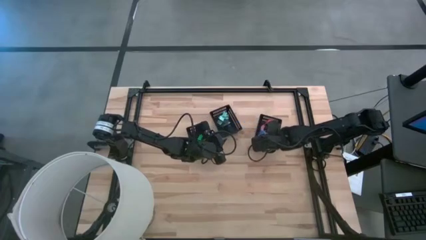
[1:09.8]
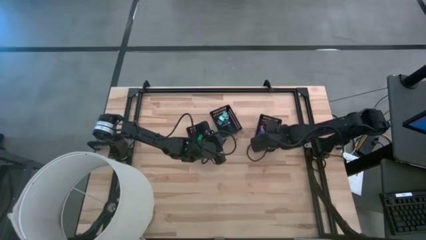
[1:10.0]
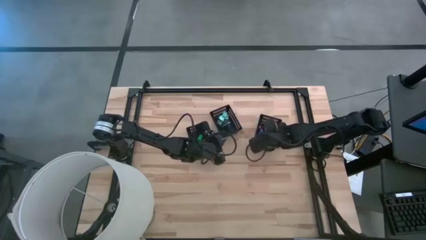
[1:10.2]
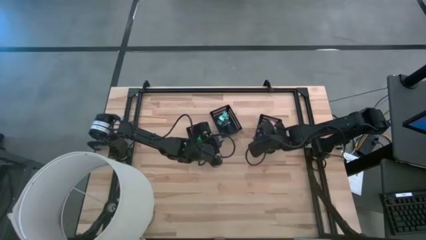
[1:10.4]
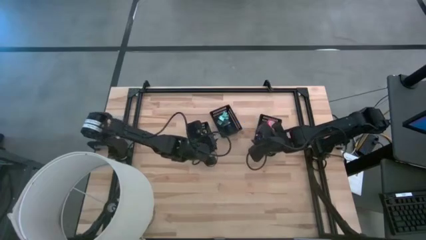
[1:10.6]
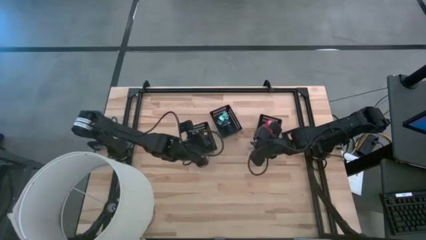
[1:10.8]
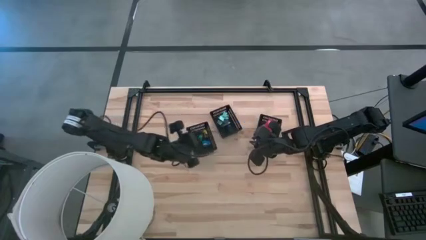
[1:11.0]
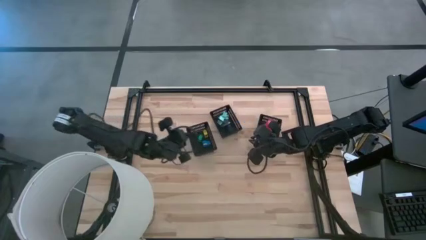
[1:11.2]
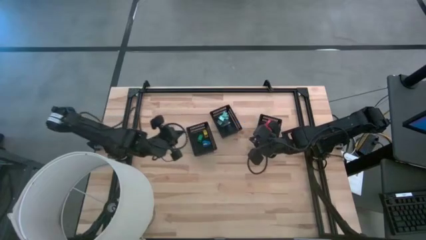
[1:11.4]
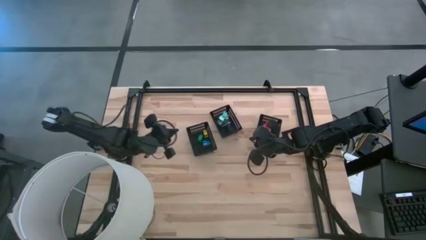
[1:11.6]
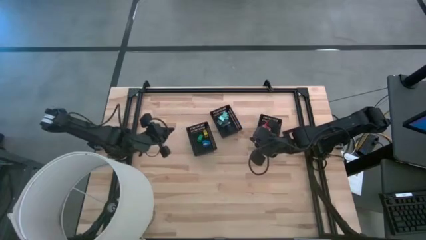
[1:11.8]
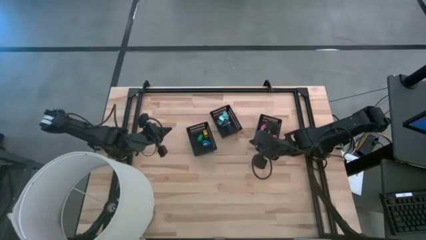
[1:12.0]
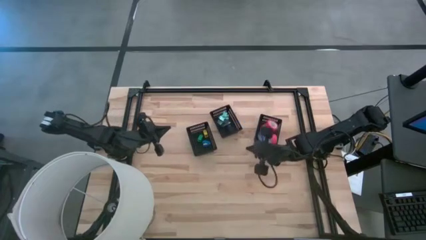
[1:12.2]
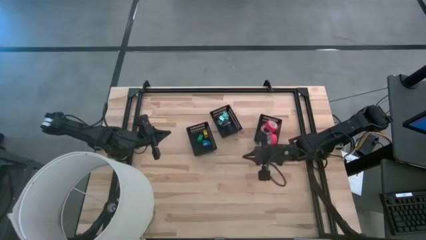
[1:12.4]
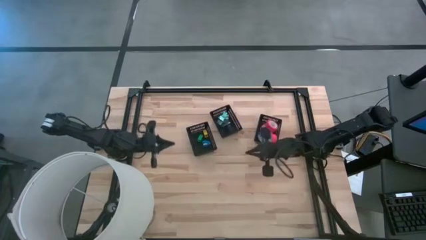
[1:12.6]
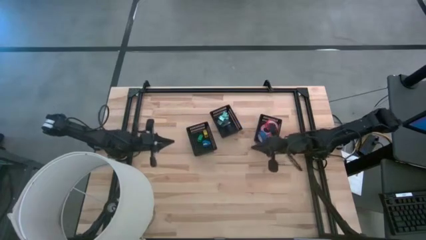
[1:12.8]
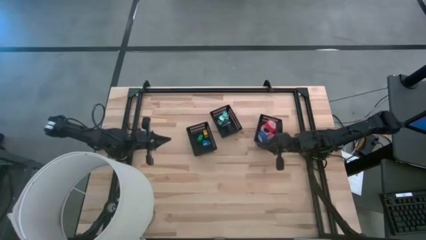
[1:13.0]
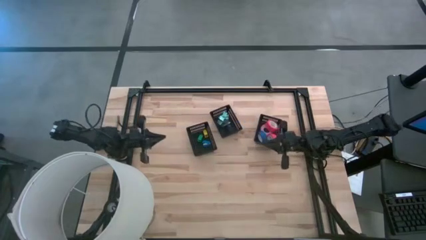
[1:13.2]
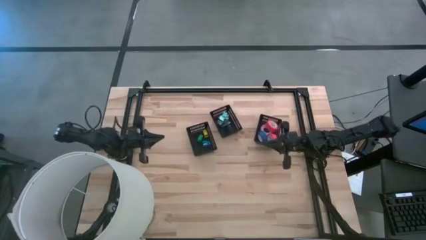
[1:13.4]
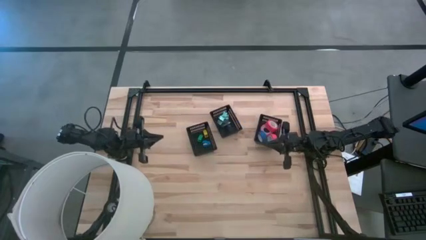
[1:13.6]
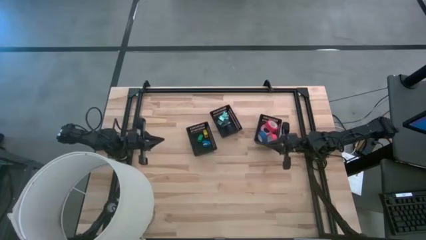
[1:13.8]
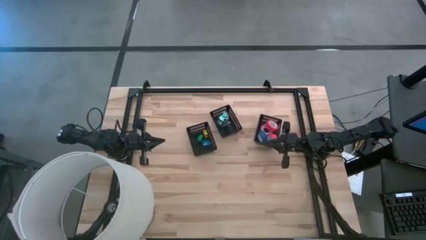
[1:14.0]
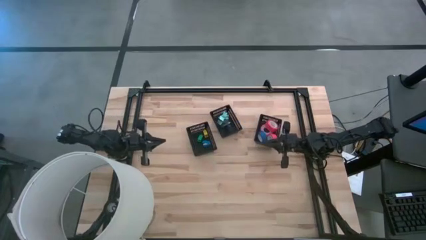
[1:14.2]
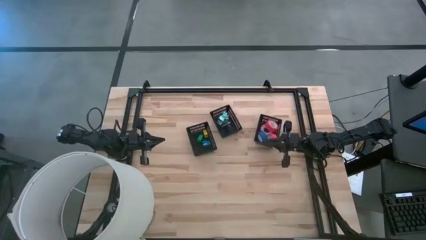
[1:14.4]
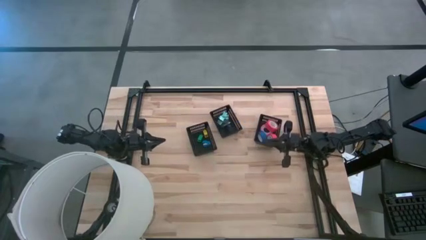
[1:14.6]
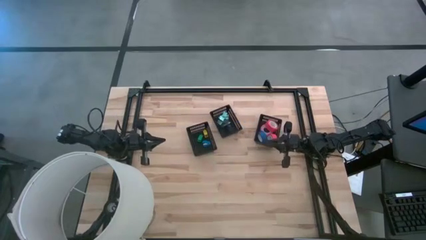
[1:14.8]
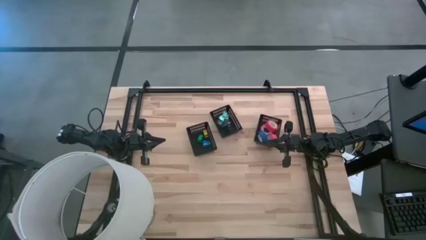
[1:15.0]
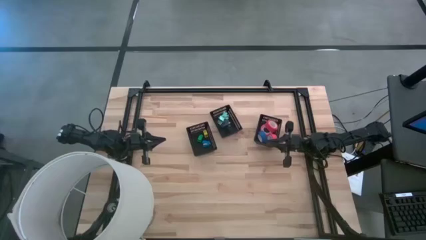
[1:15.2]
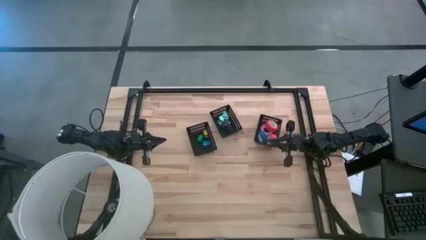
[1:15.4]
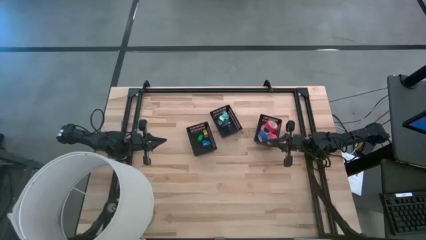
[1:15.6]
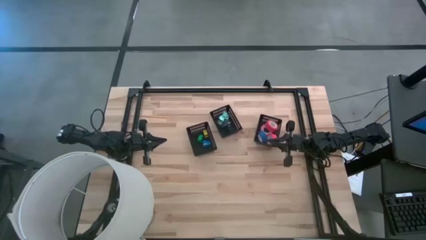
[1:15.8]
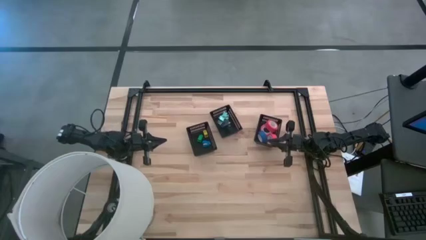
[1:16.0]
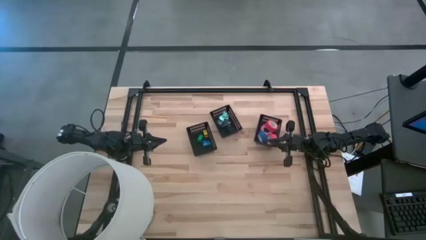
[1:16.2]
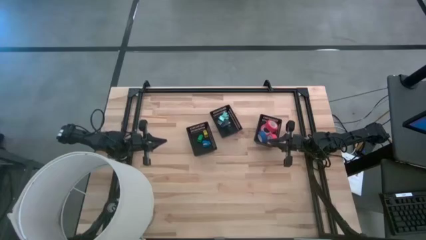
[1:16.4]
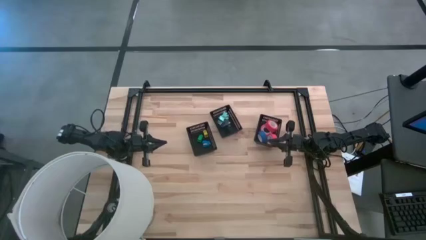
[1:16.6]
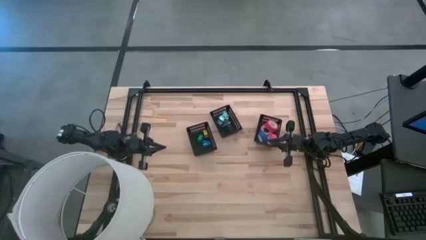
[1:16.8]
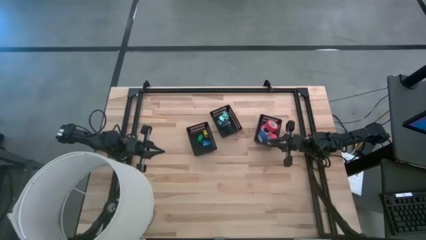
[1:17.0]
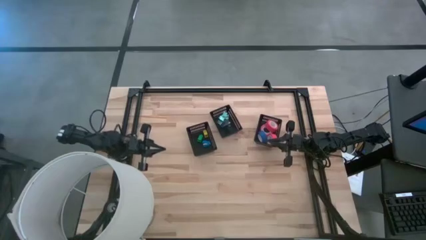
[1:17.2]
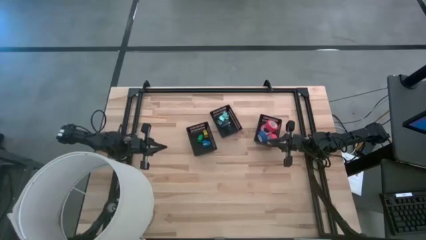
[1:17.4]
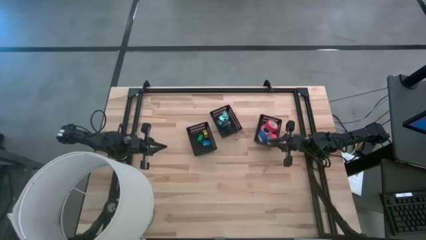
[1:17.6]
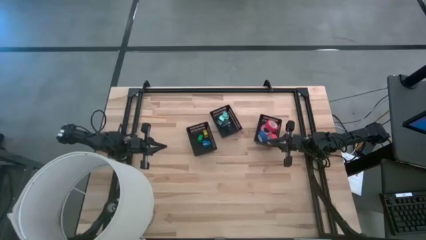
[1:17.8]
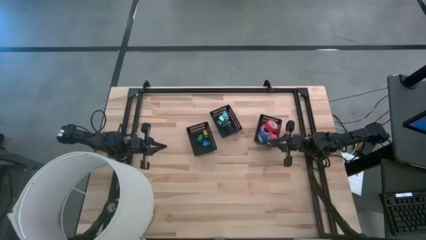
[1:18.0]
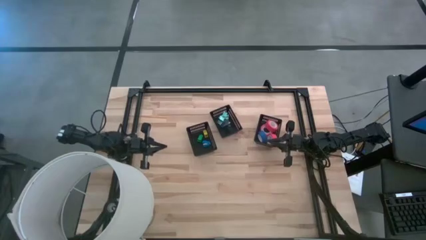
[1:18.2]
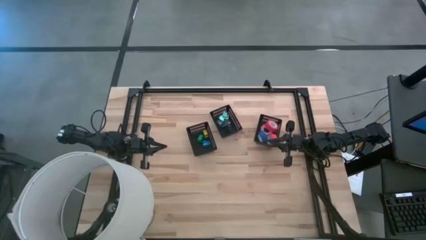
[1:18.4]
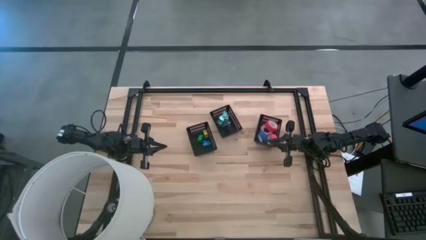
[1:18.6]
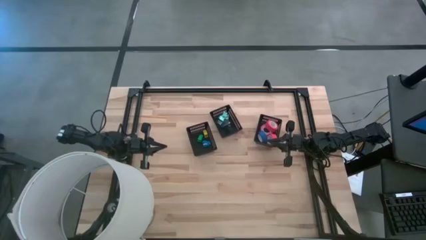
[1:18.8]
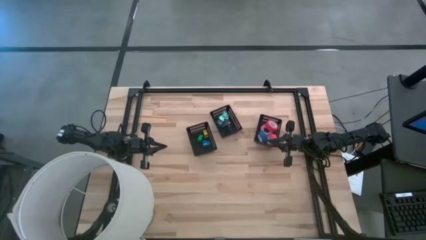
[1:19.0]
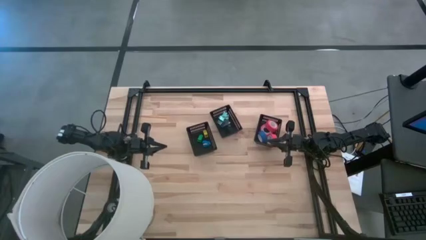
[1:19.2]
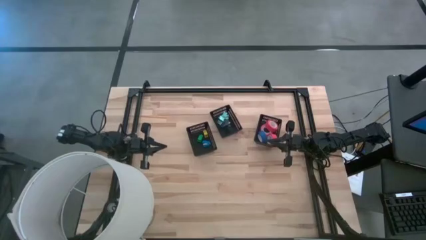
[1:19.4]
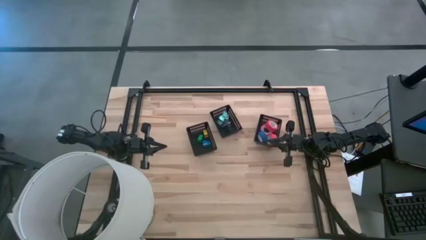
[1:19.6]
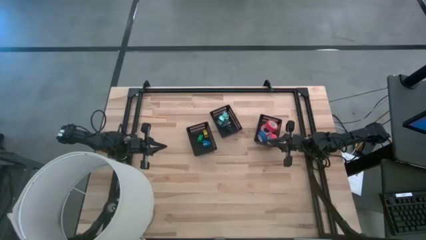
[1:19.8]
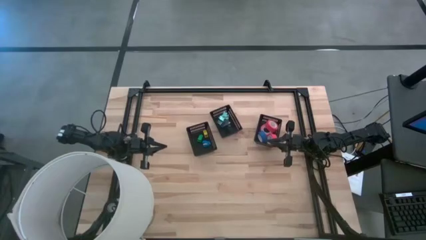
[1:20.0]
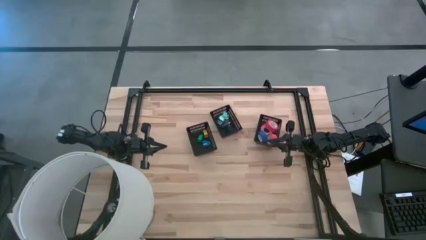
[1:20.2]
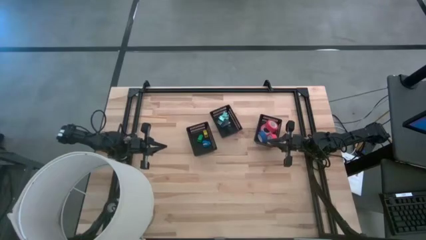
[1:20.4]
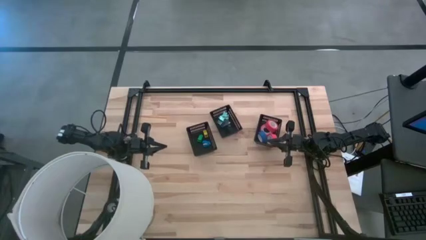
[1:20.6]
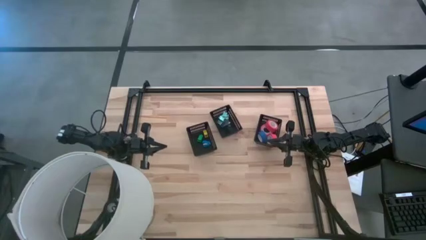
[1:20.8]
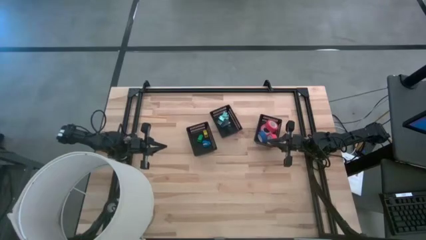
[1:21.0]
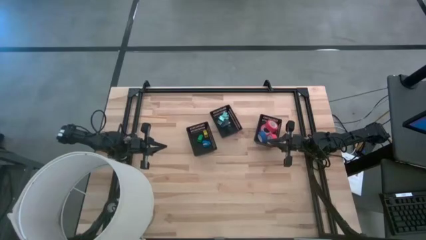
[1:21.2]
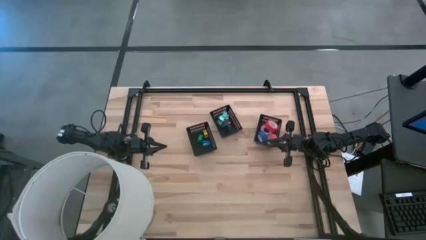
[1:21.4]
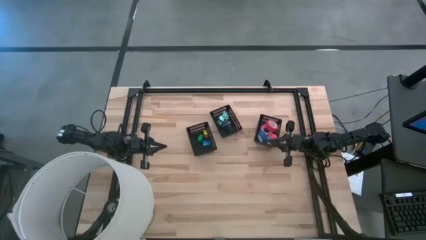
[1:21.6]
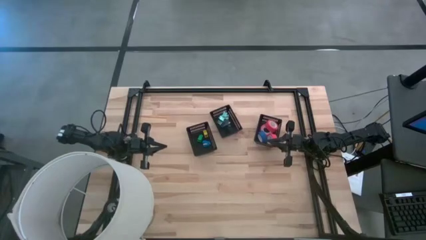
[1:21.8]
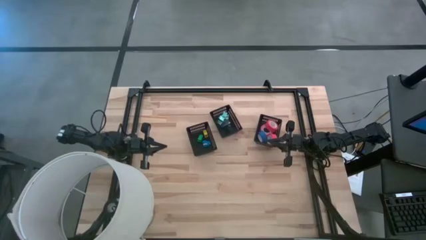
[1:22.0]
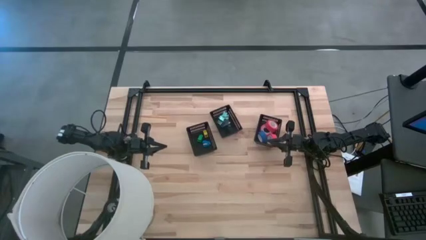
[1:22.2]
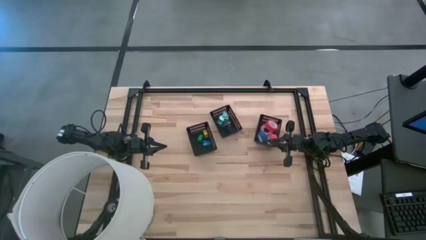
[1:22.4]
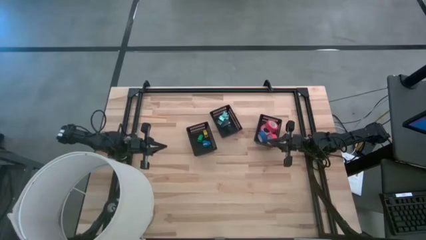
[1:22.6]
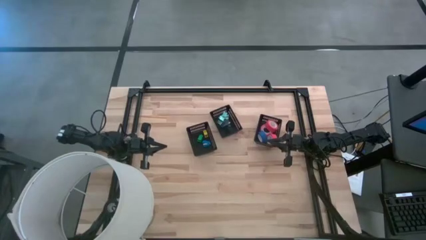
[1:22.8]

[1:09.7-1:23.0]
Task: Pick and place Stapler, Stapler remover, tape
Return to Home Position
